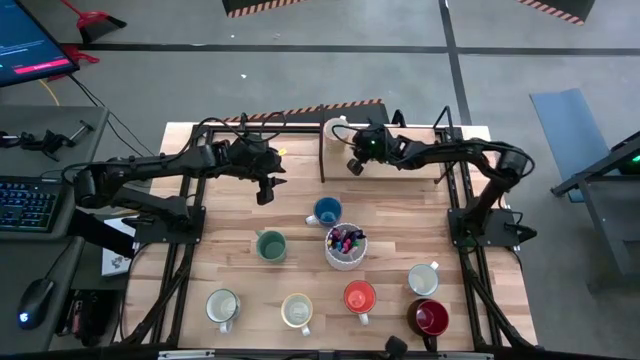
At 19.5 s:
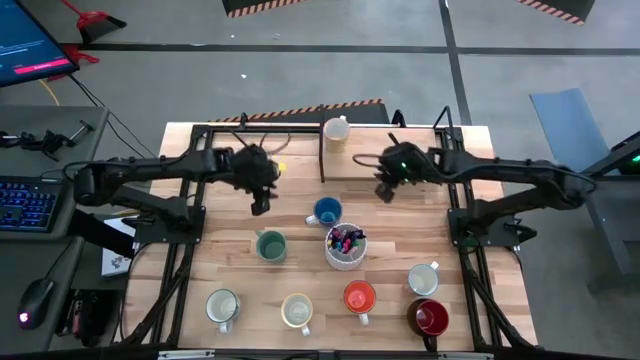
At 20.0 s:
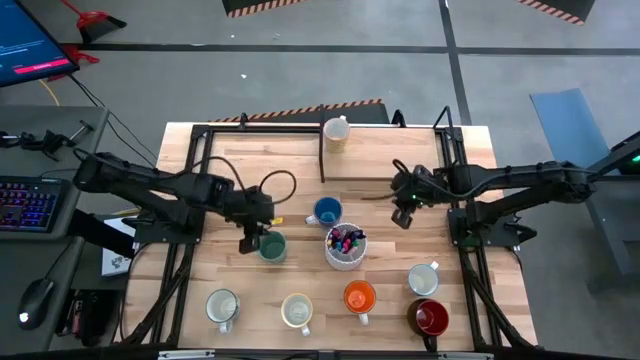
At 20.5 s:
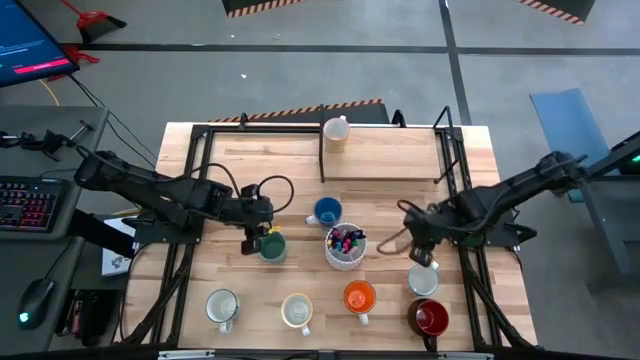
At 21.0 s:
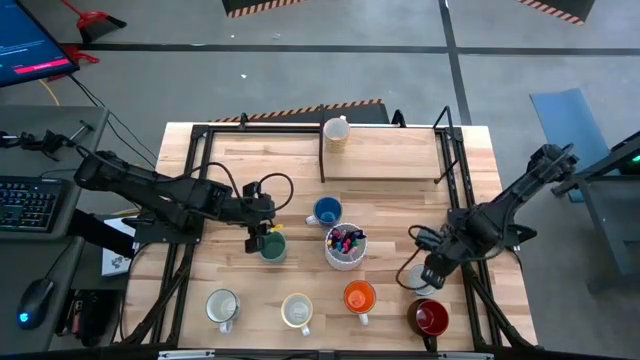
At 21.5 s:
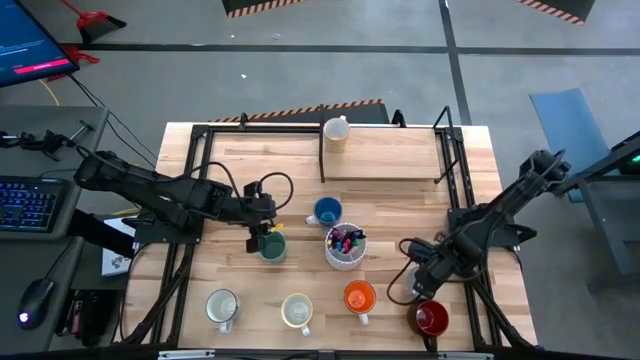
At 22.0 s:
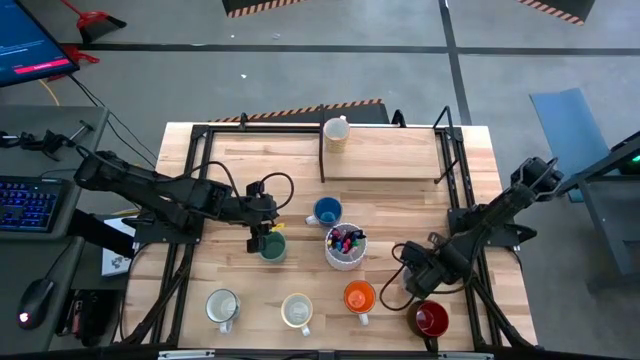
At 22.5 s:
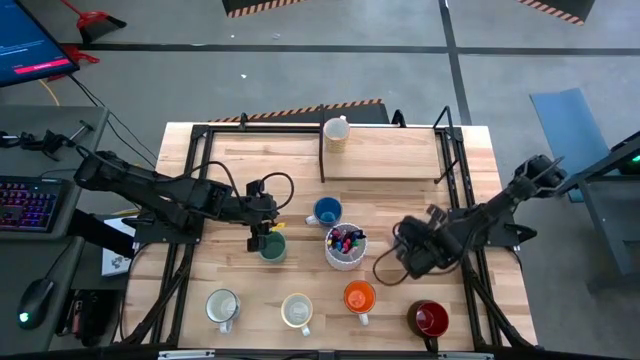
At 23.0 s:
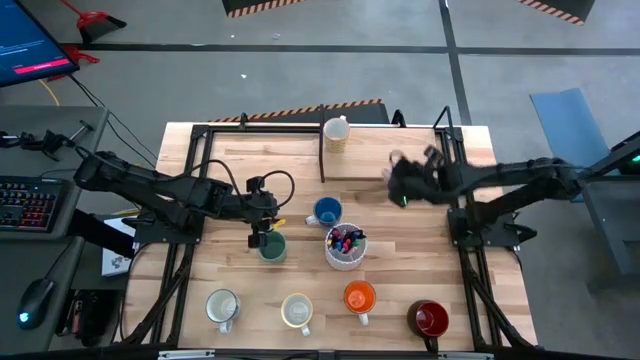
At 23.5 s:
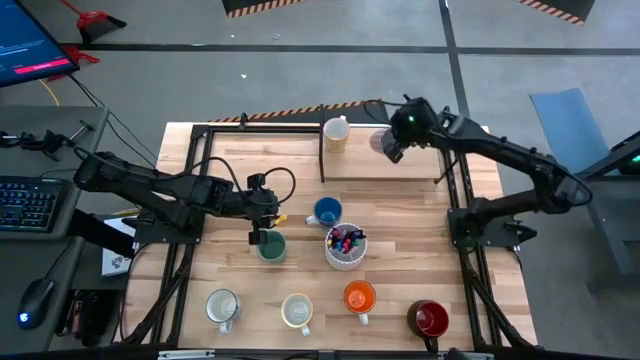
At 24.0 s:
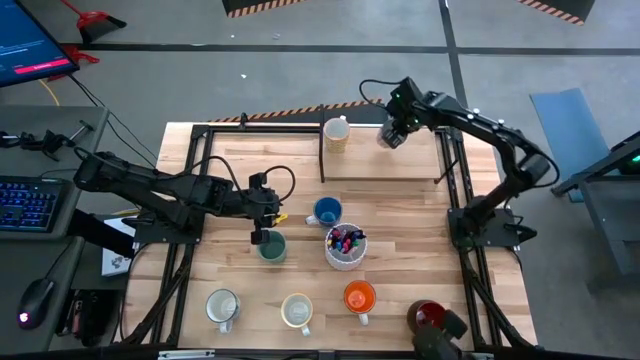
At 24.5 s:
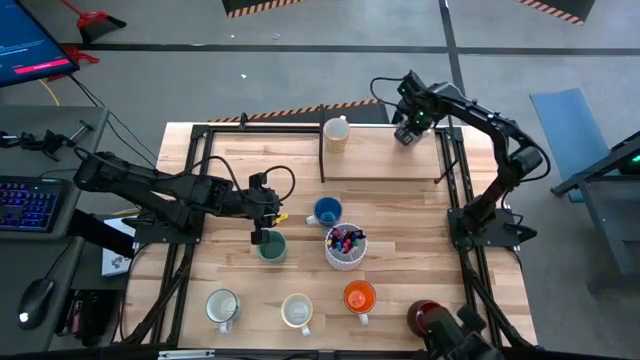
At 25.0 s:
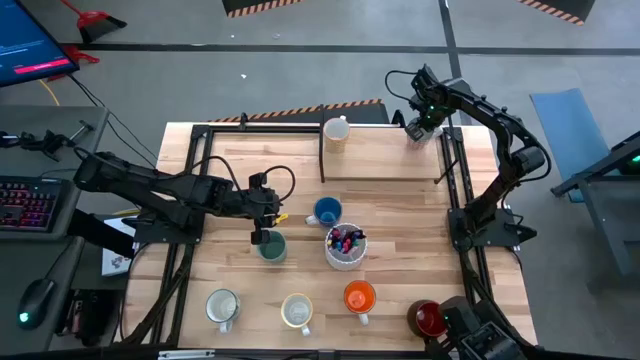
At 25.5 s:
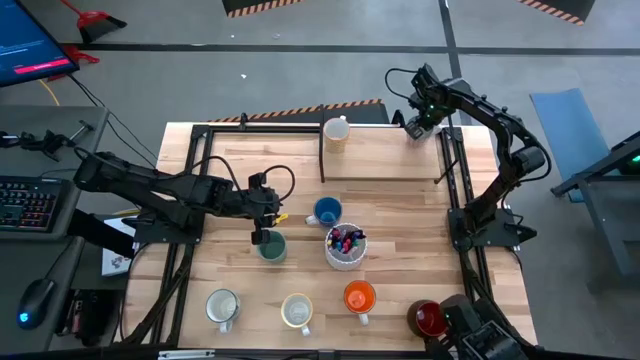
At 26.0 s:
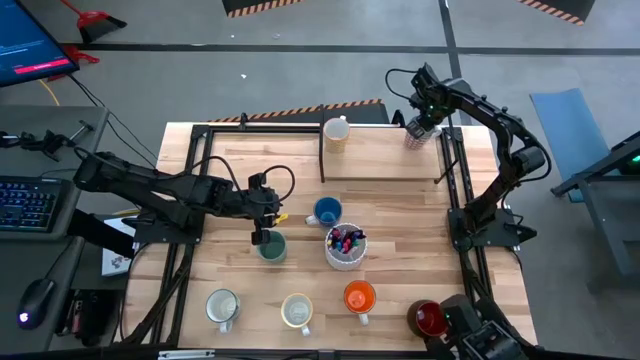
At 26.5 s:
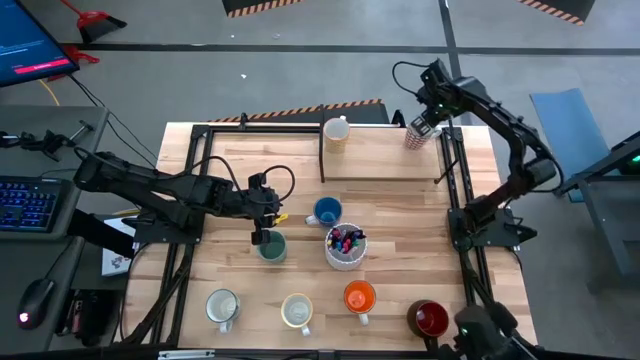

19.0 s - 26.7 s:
Task: Place coffee mugs
Put the red patterned mug on the shelf

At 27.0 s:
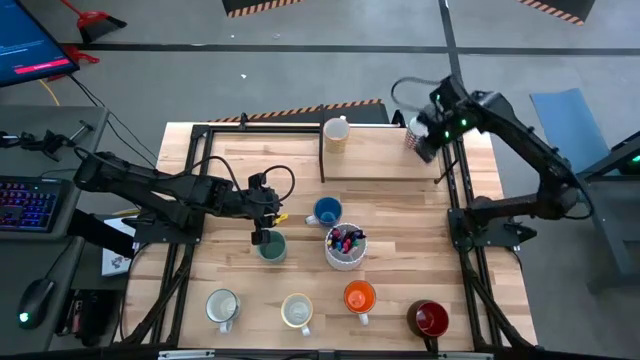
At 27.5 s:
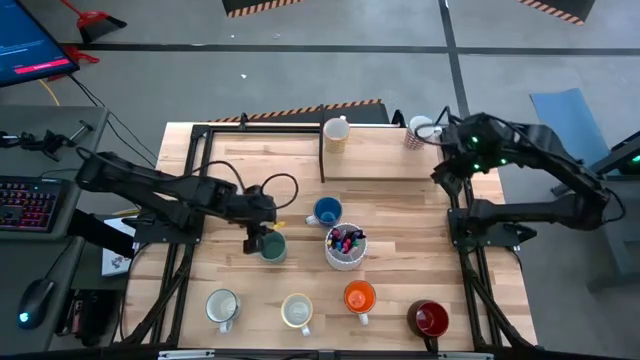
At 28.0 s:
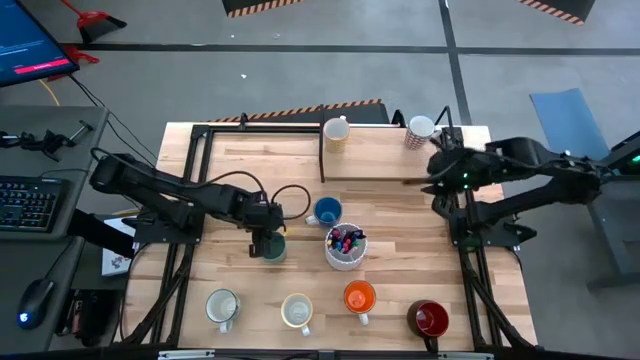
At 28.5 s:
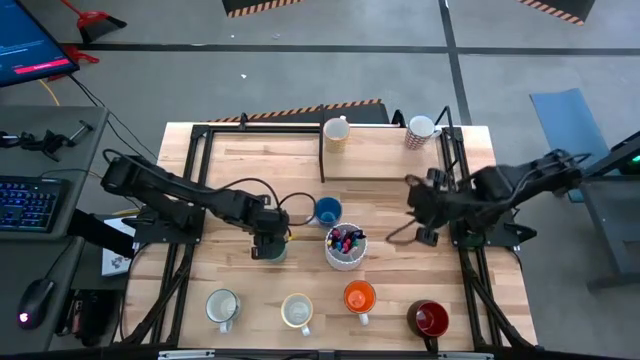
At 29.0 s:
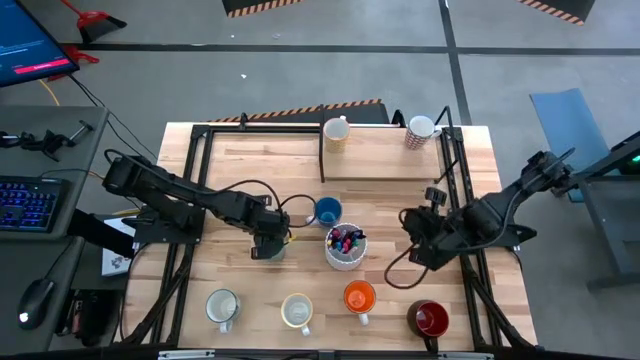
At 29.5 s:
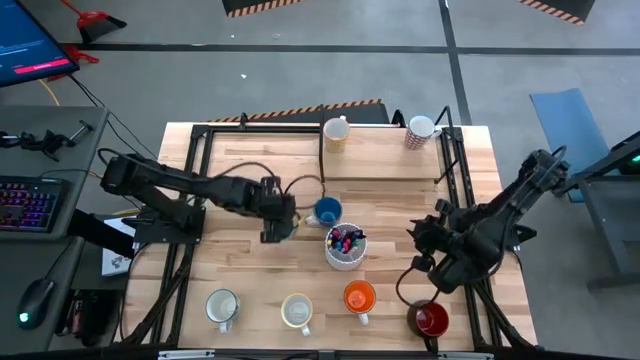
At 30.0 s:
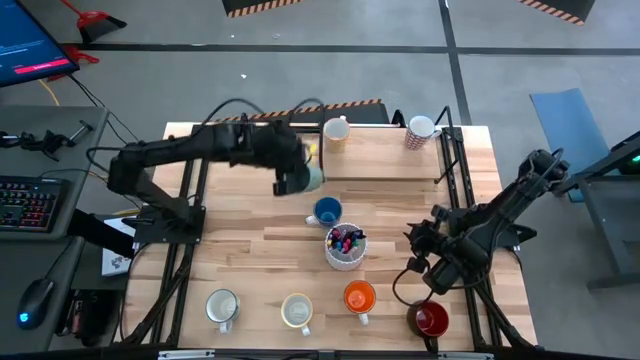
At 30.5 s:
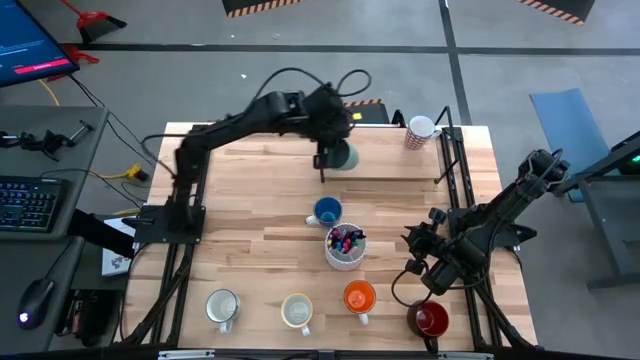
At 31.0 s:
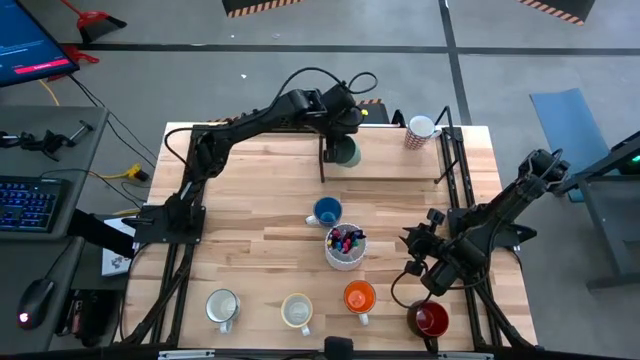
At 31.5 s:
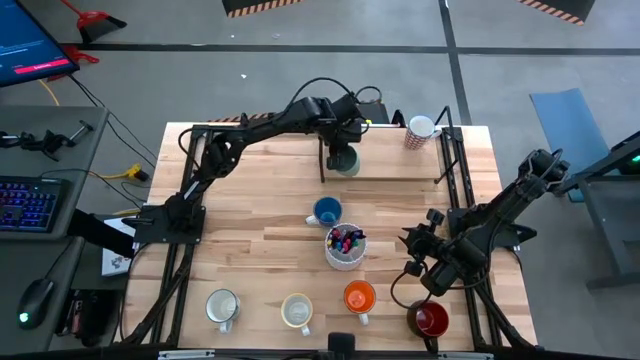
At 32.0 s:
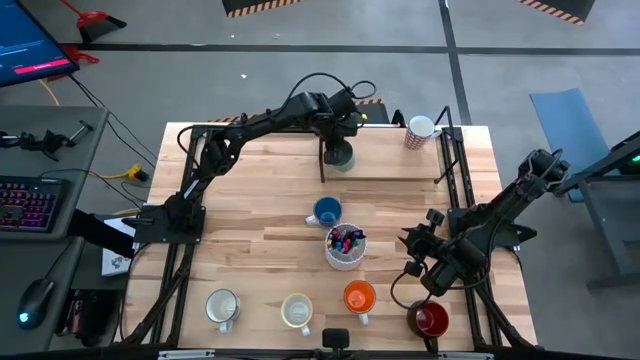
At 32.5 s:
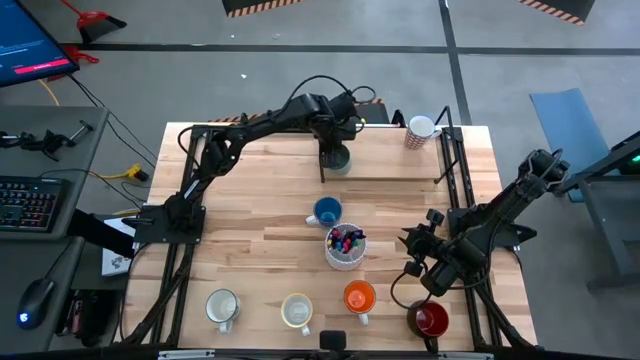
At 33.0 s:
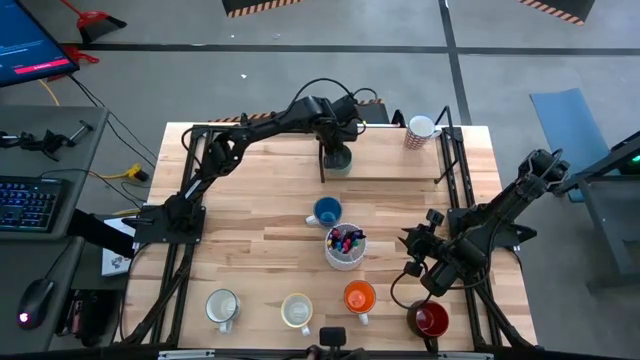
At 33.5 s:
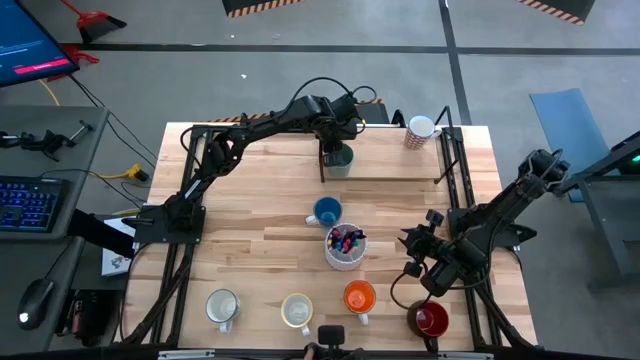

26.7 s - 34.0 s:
Put the green mug on the shelf

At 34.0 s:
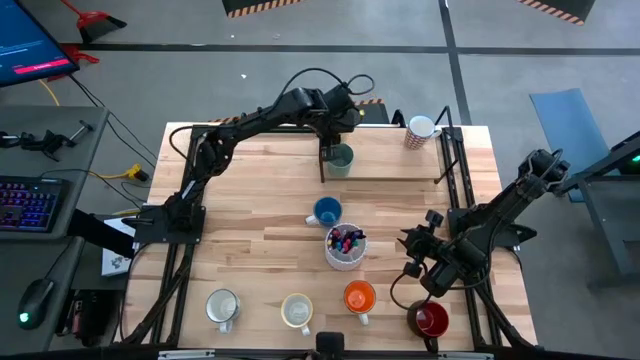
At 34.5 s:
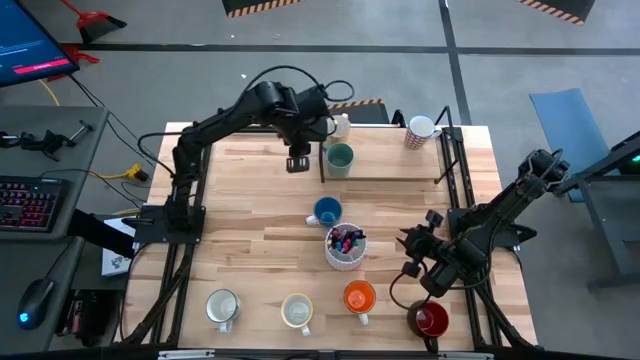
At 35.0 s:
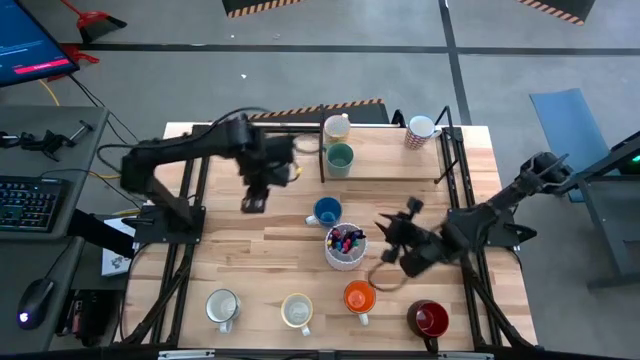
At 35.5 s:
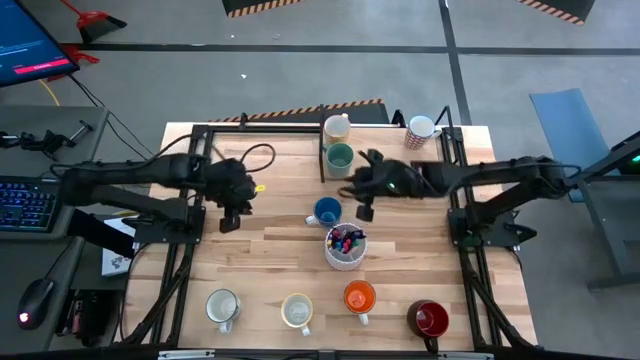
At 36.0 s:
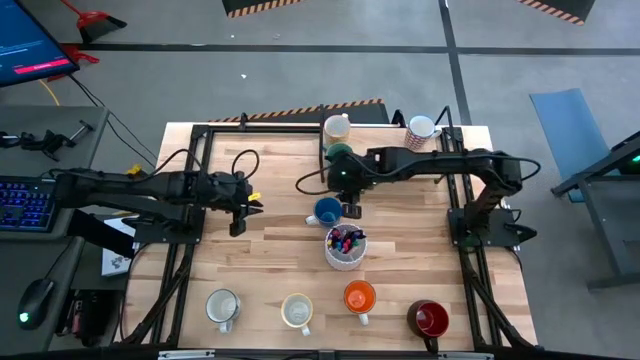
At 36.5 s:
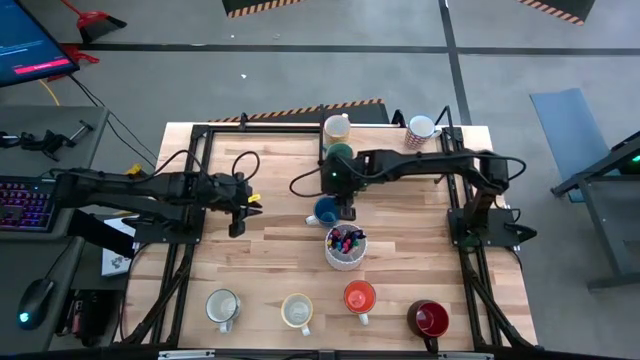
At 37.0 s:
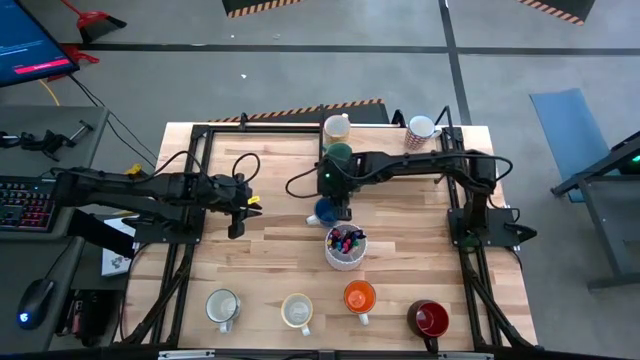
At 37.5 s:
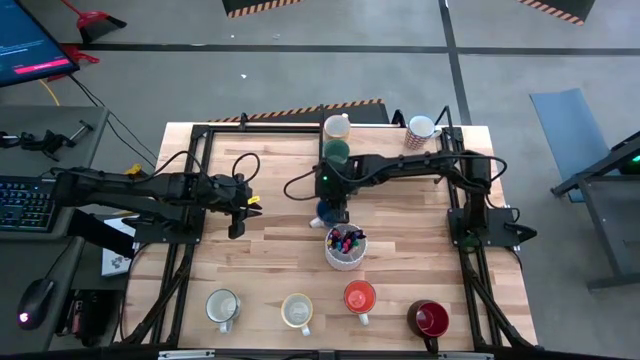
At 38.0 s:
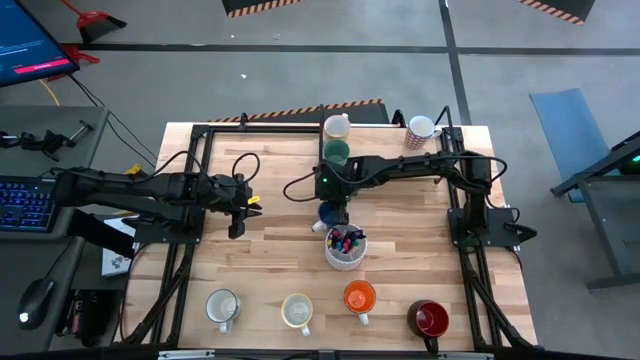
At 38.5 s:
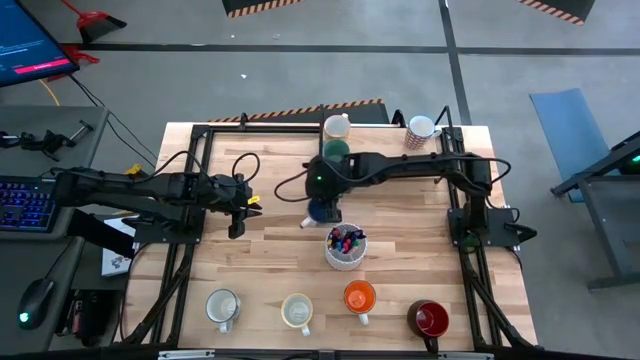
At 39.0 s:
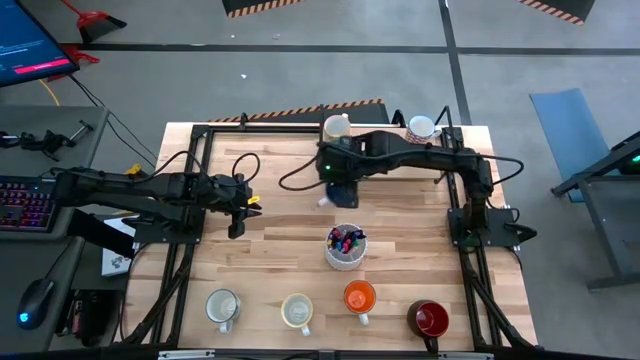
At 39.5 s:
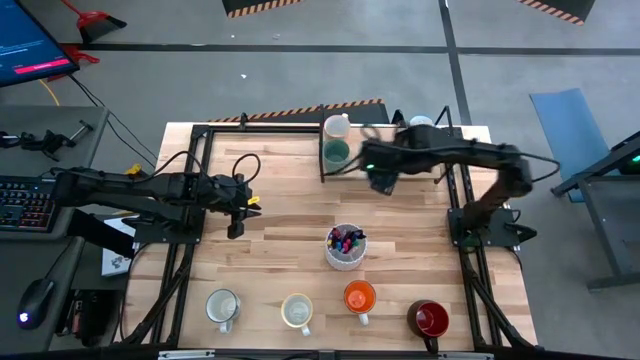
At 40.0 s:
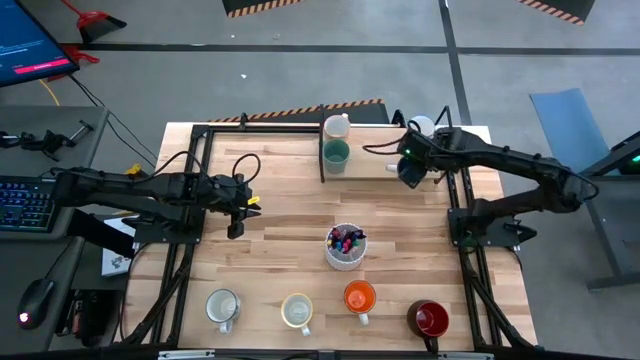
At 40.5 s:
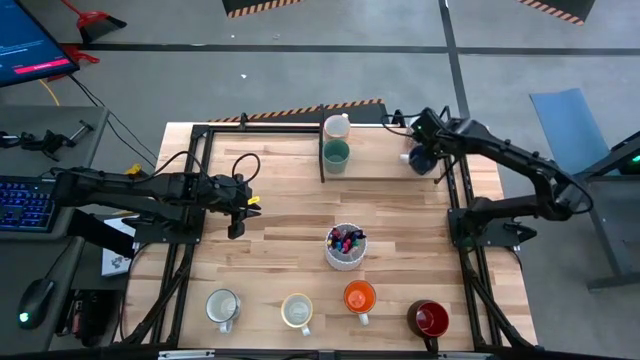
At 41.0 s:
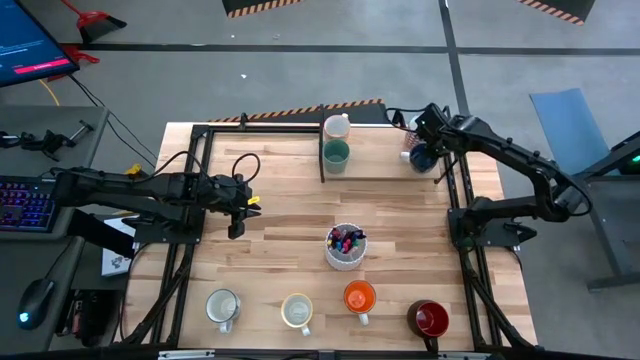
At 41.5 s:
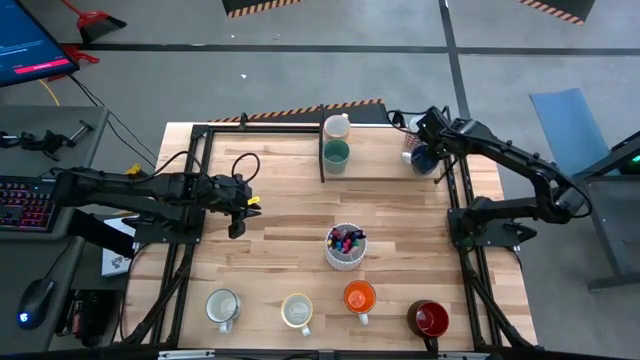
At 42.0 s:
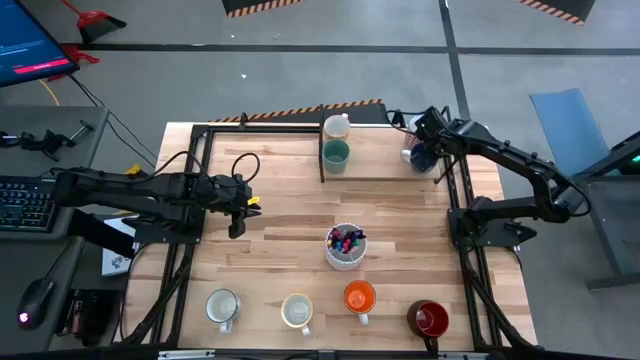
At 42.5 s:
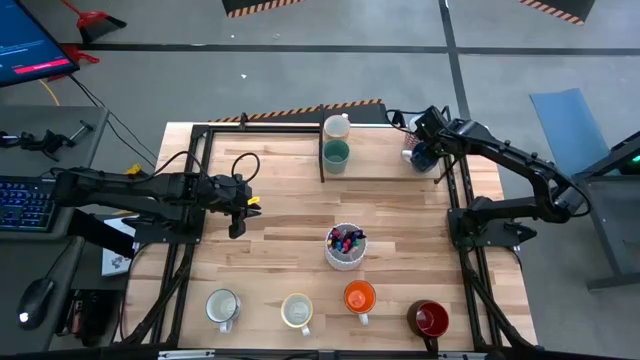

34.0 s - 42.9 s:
Put the blue mug on the shelf
